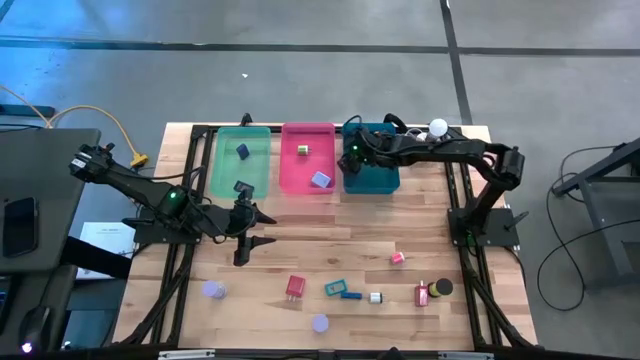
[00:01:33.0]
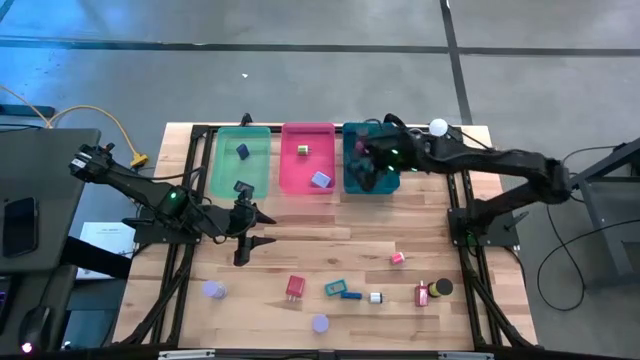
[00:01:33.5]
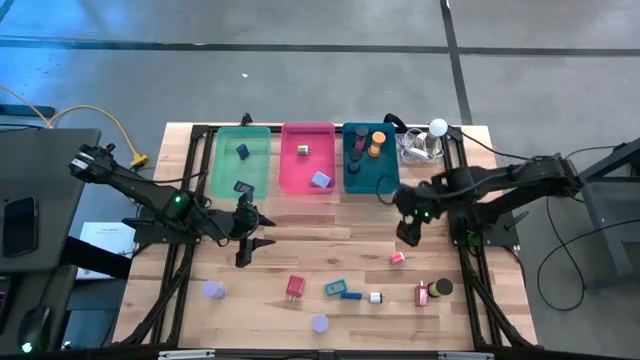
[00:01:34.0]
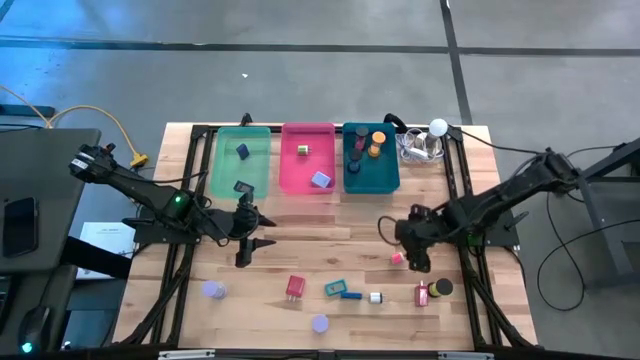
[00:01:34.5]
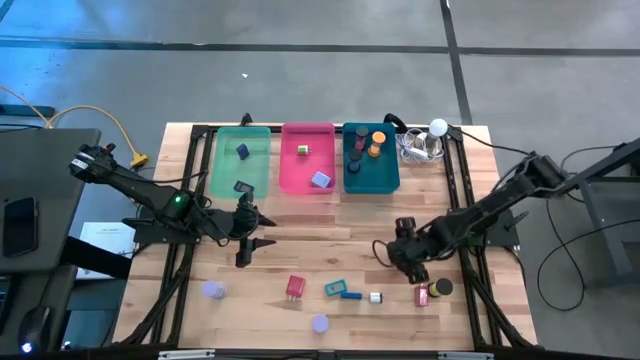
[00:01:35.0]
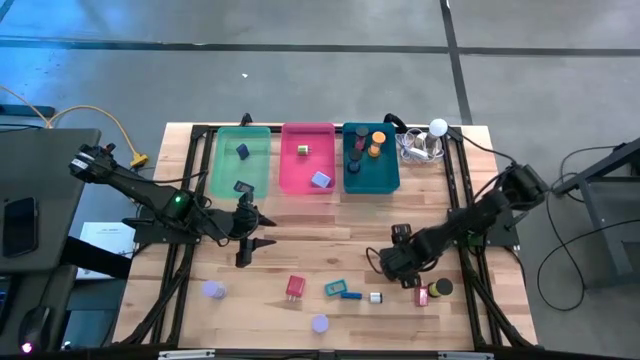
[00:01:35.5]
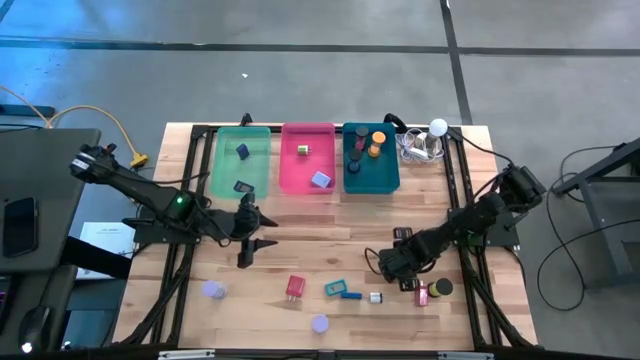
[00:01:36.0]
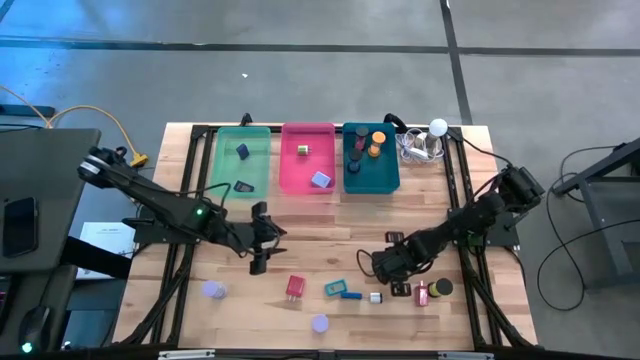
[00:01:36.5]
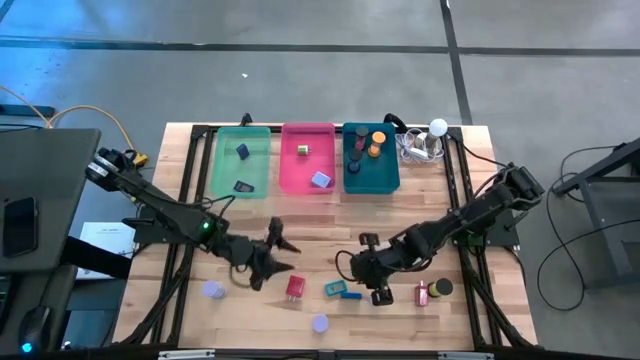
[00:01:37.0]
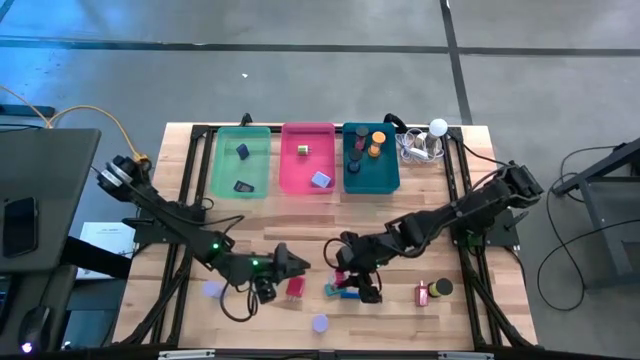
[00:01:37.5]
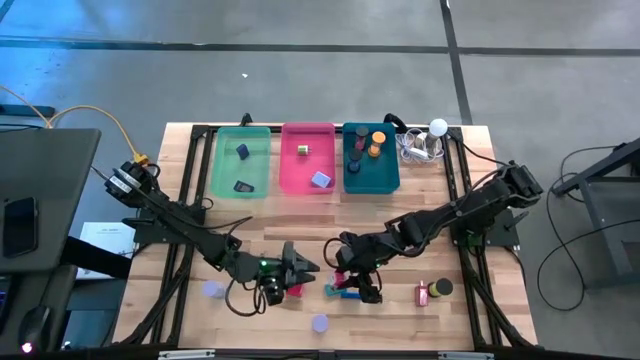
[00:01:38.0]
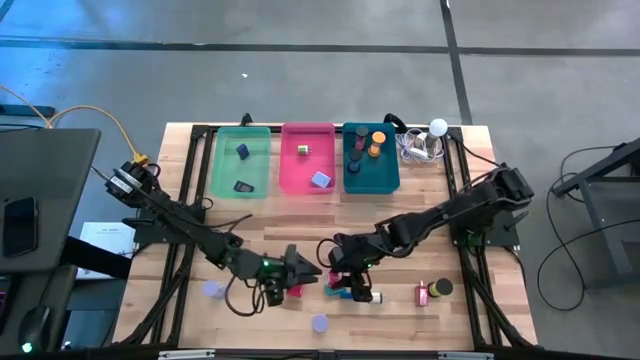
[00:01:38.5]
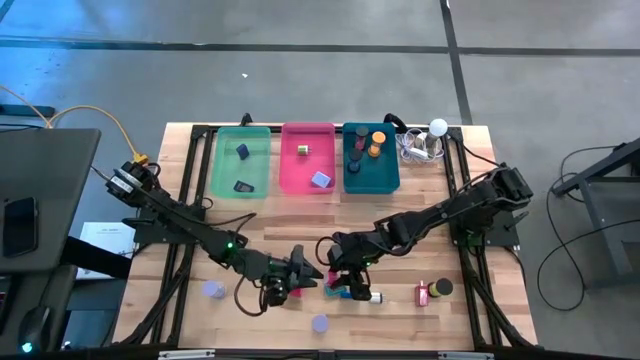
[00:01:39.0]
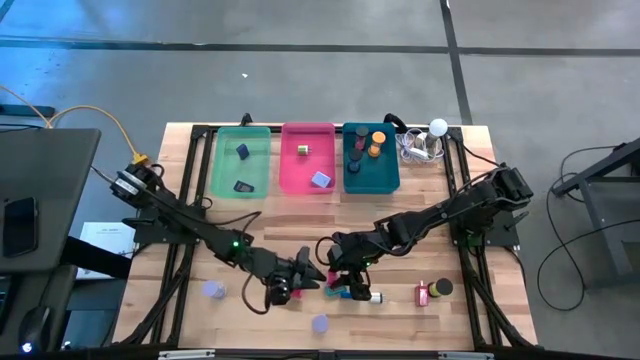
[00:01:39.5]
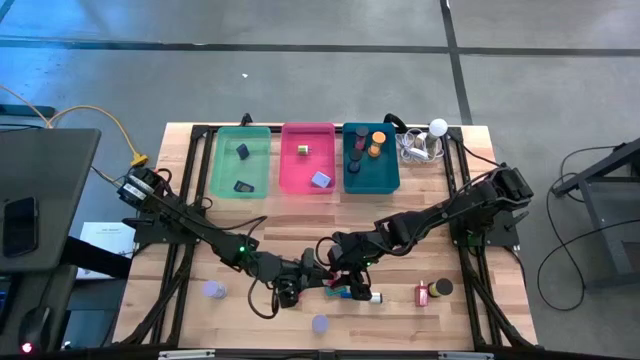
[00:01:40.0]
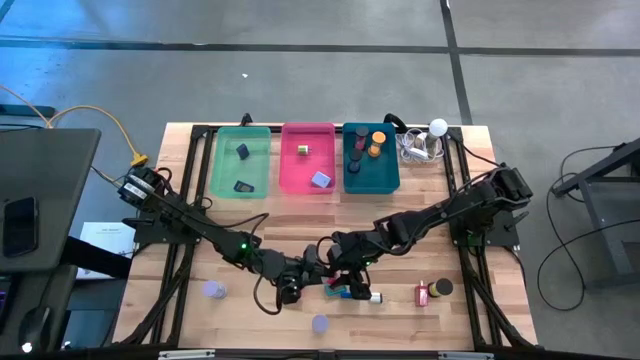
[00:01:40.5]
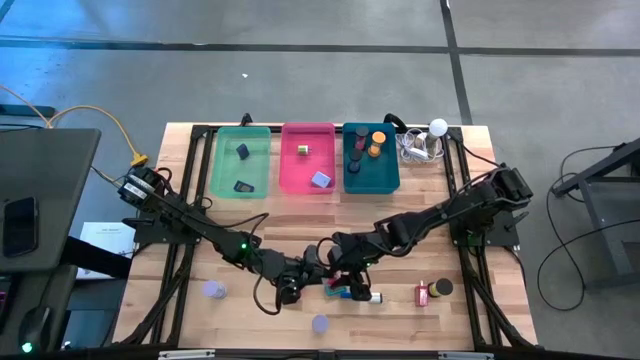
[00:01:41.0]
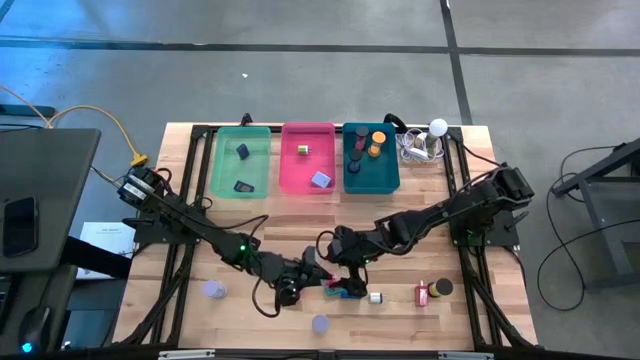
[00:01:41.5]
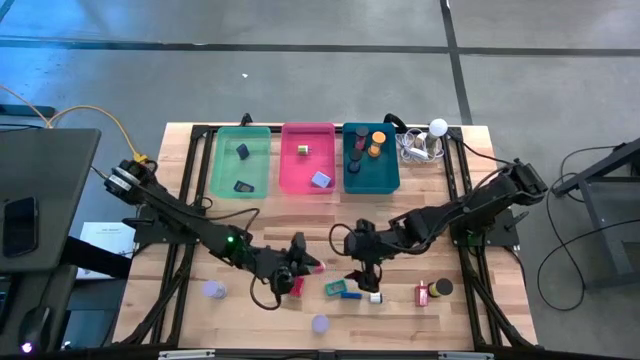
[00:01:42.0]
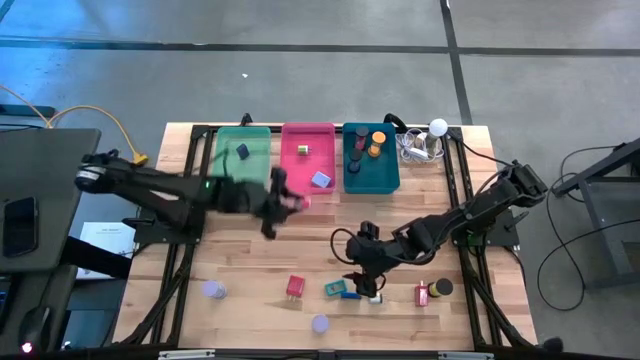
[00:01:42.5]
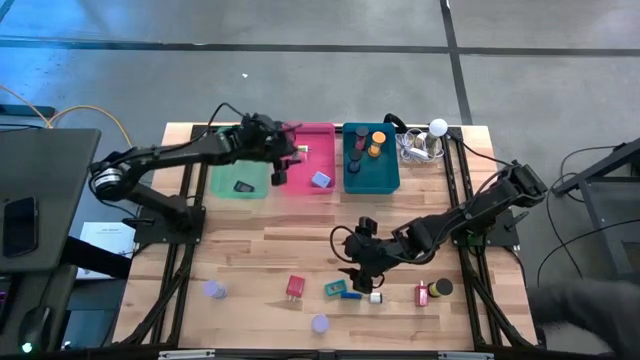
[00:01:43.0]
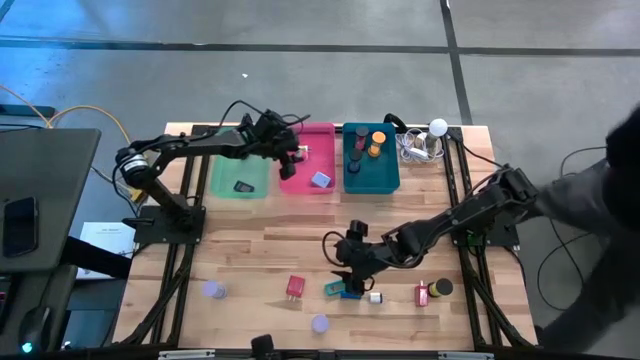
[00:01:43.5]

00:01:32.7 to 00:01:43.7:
Task: Pick & Place Office items
Put the pink charger adapter into the red bin

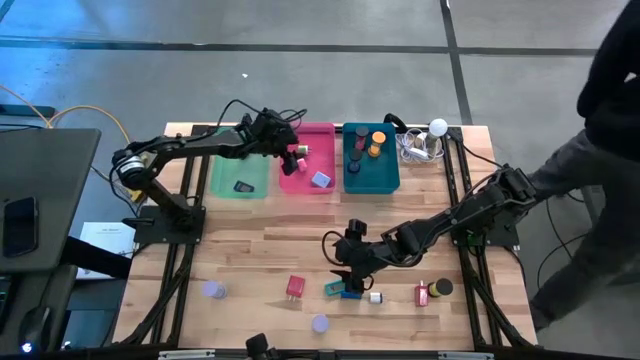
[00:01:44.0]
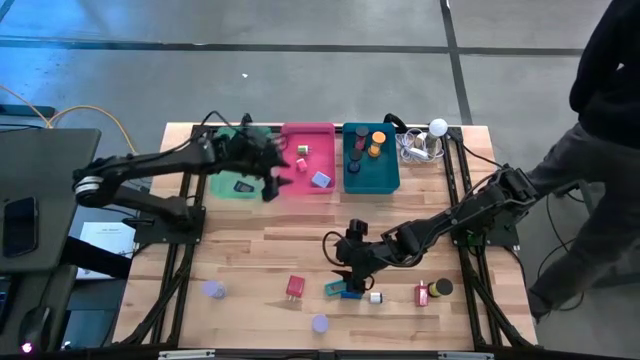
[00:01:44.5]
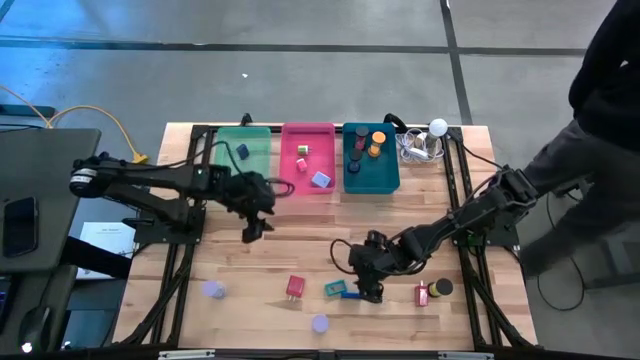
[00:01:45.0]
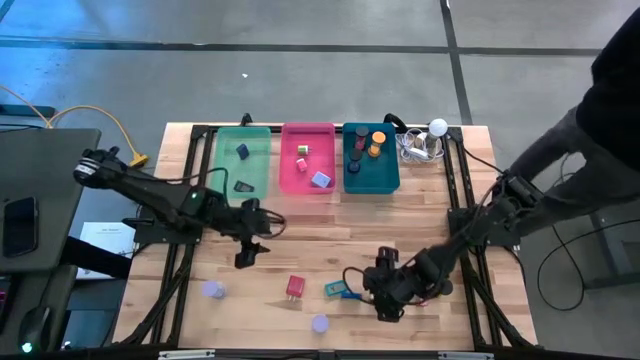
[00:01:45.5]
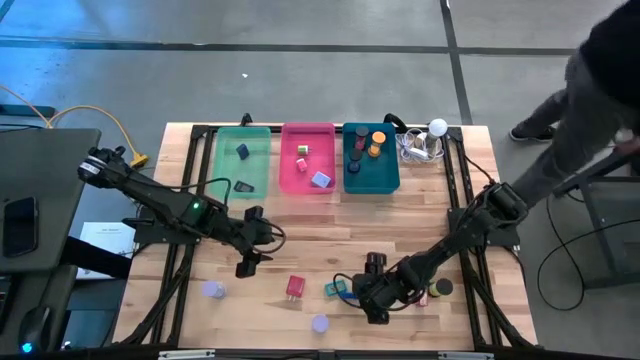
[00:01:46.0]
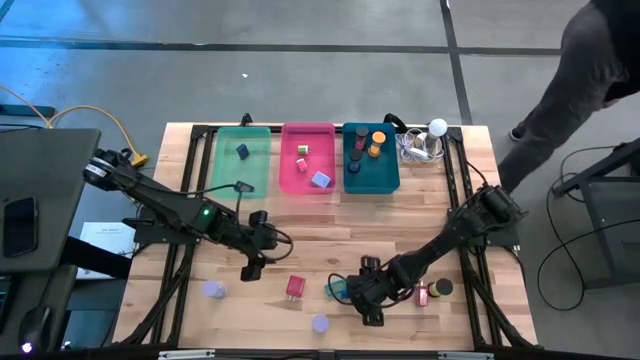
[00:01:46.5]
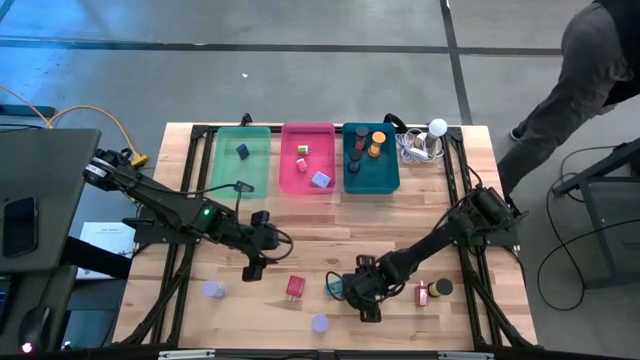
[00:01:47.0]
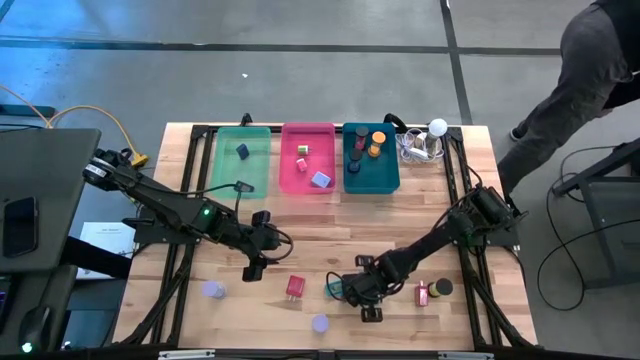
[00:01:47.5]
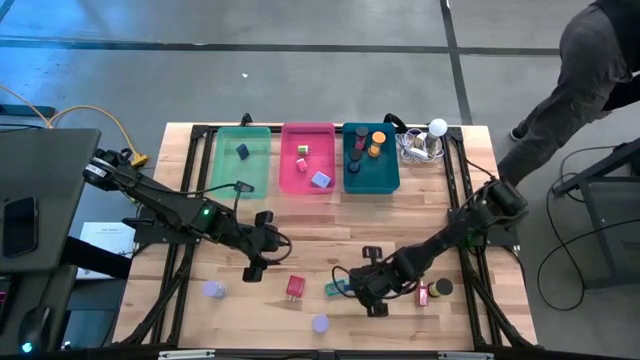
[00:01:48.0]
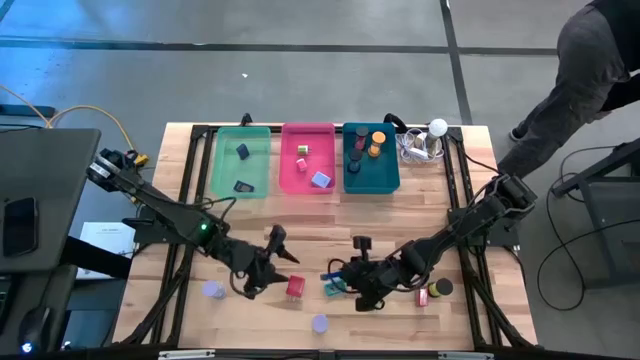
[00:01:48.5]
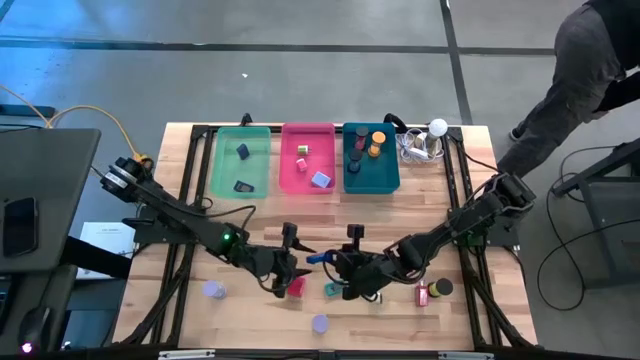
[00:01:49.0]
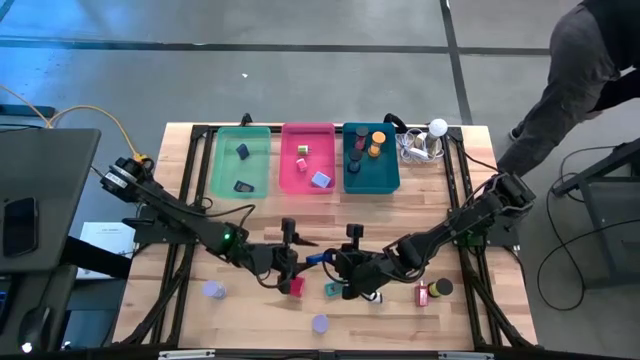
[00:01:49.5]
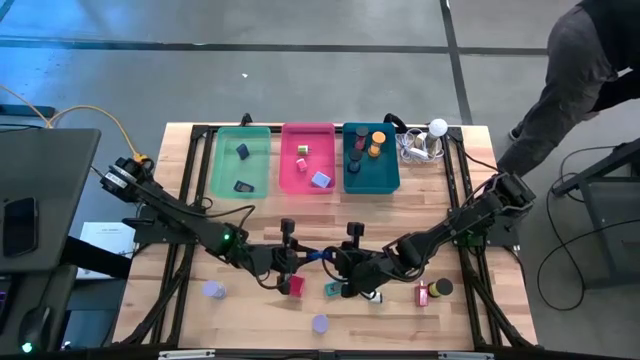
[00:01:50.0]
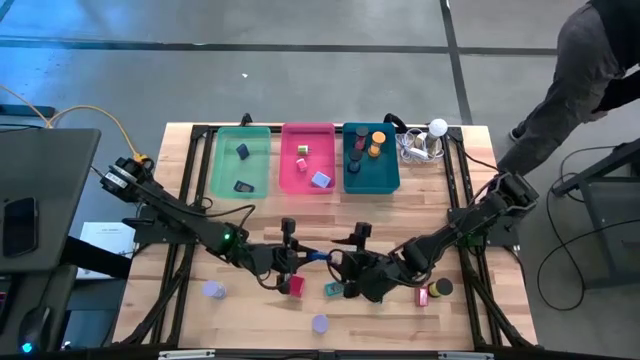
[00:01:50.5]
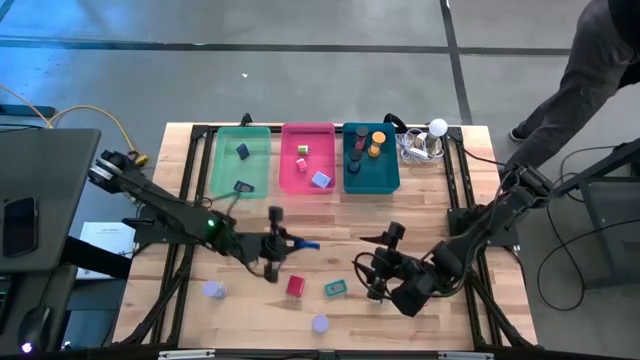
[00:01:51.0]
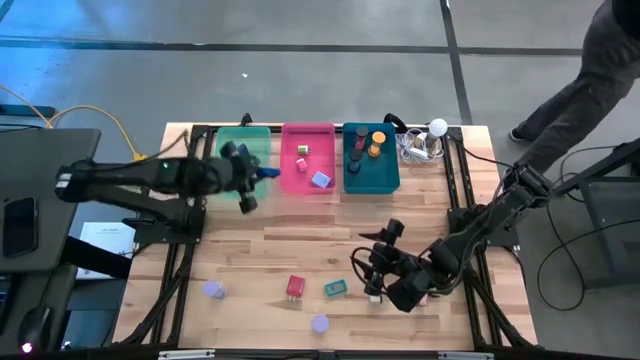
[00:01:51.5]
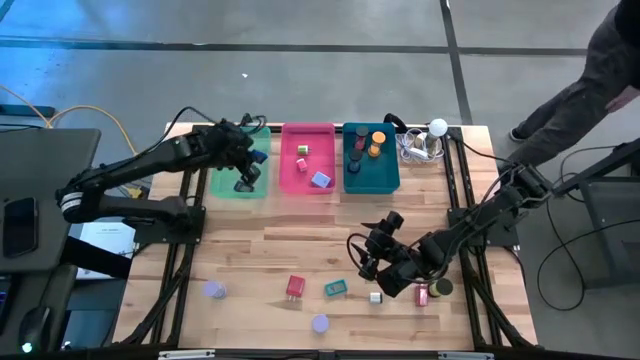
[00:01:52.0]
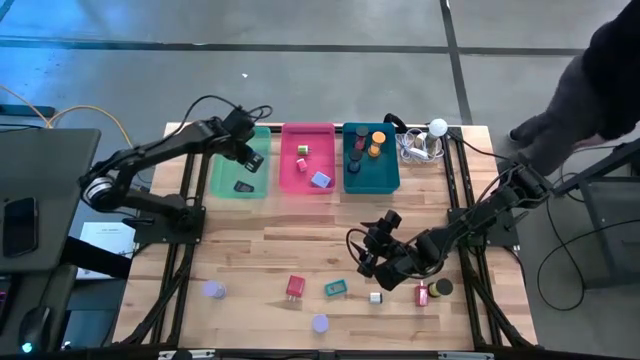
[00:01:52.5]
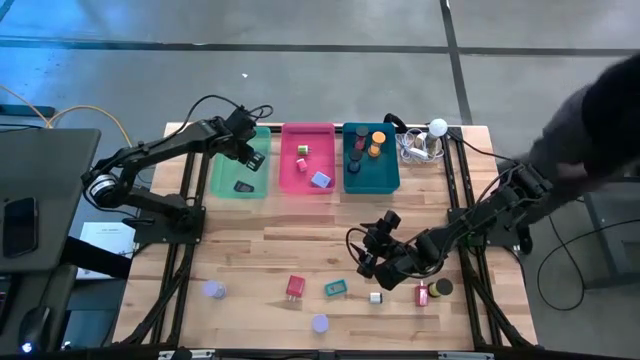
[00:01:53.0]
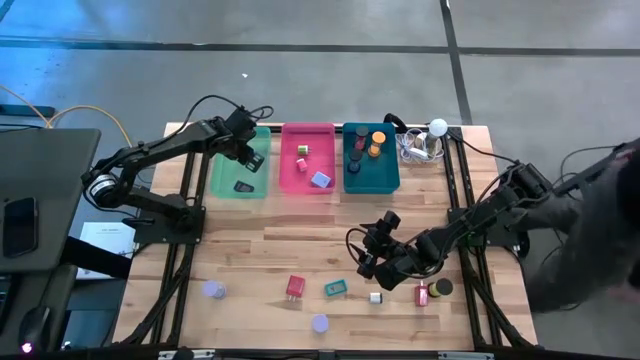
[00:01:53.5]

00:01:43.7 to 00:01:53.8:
Put the dark blue digital timer into the green bin
